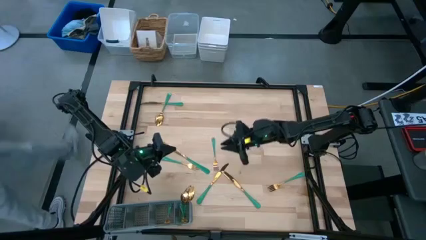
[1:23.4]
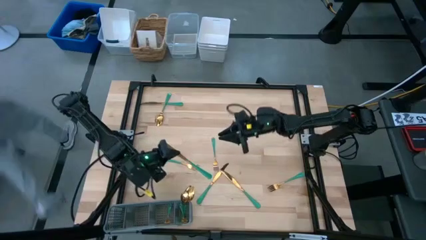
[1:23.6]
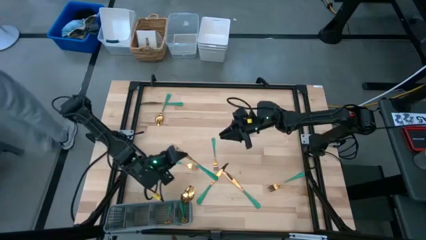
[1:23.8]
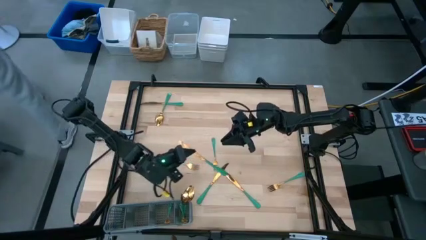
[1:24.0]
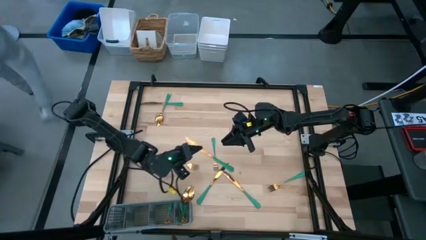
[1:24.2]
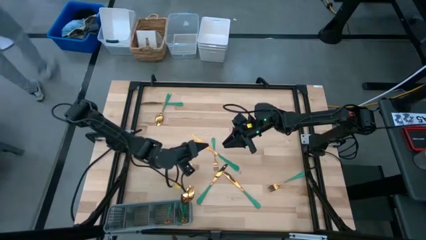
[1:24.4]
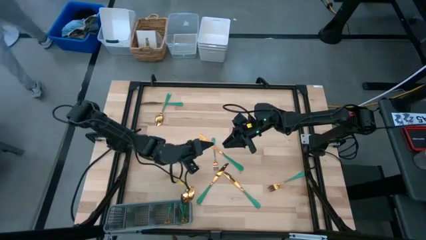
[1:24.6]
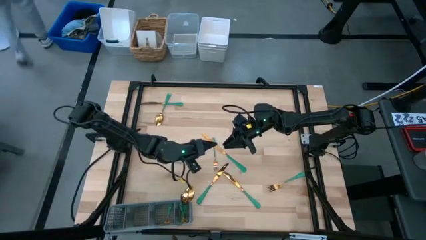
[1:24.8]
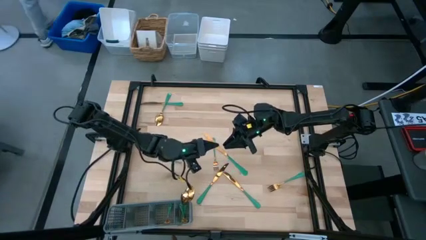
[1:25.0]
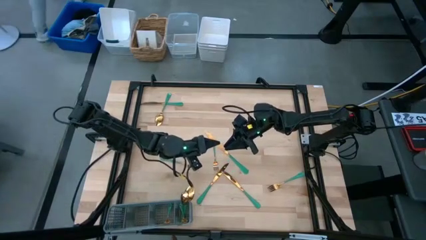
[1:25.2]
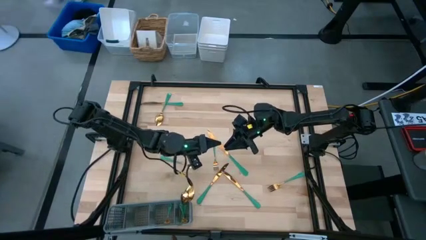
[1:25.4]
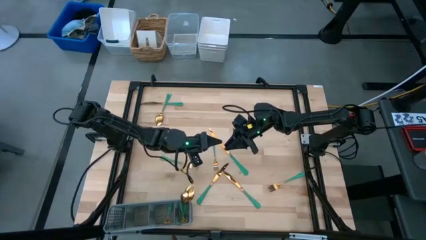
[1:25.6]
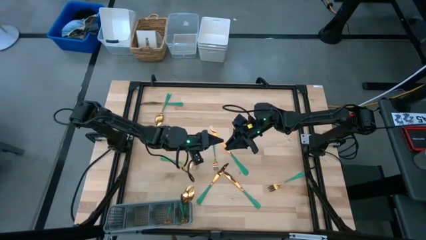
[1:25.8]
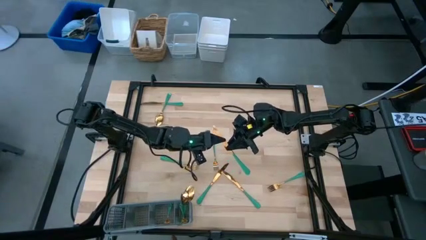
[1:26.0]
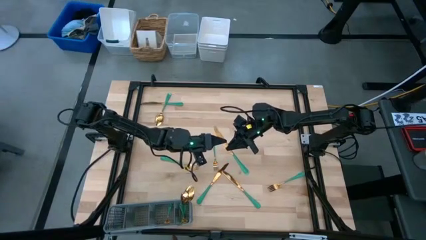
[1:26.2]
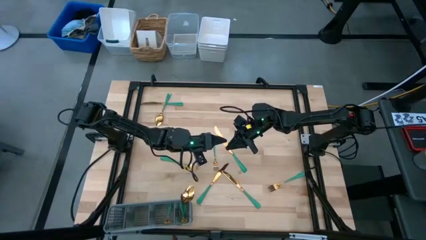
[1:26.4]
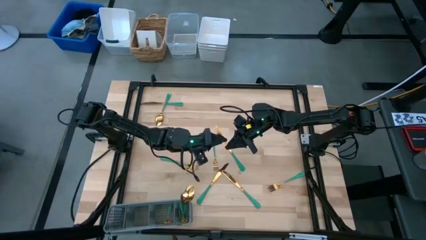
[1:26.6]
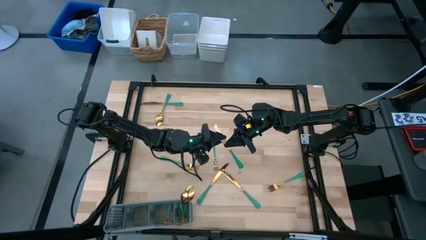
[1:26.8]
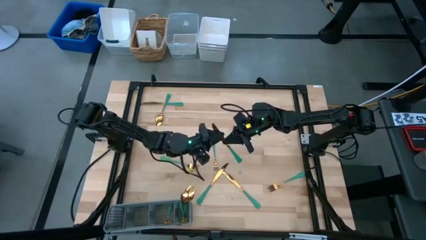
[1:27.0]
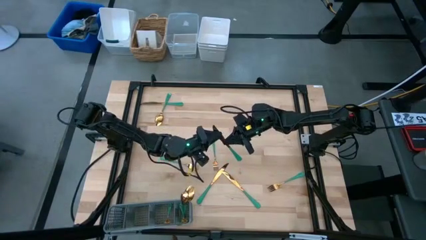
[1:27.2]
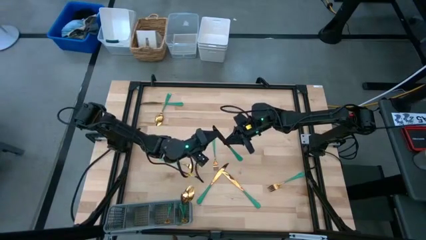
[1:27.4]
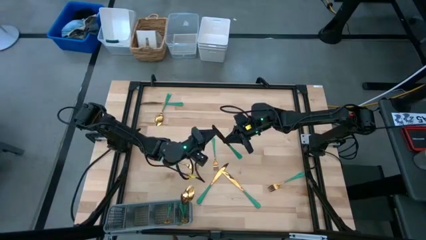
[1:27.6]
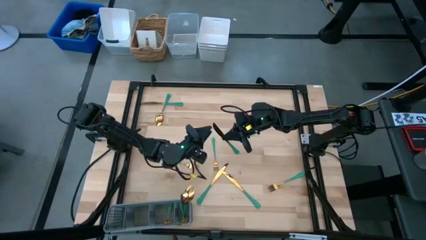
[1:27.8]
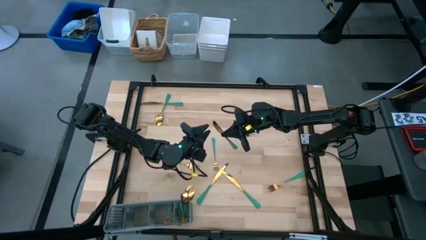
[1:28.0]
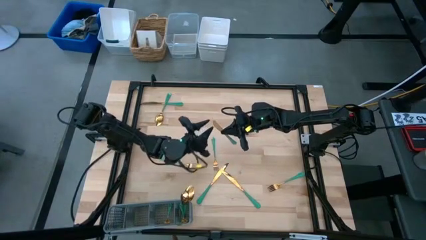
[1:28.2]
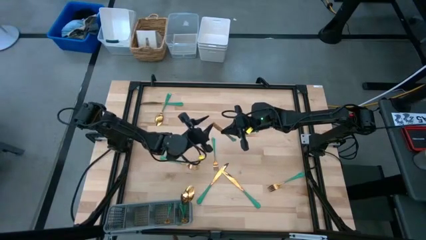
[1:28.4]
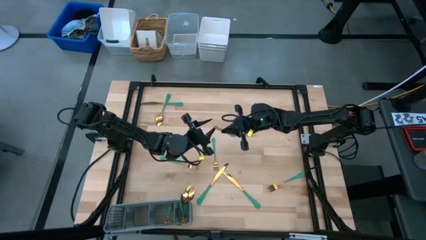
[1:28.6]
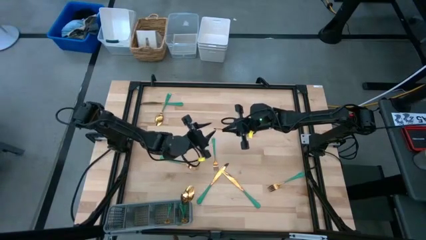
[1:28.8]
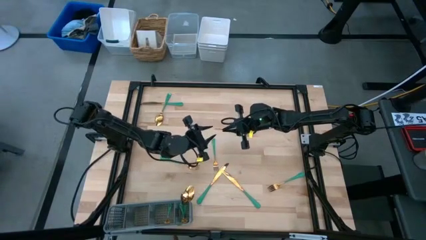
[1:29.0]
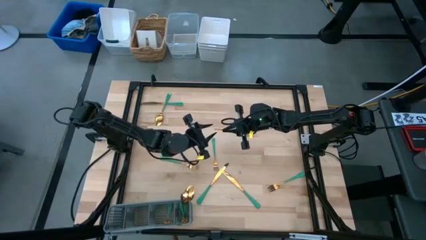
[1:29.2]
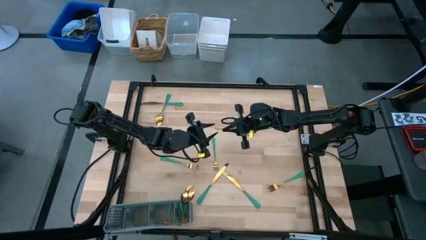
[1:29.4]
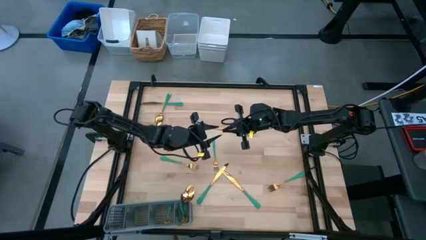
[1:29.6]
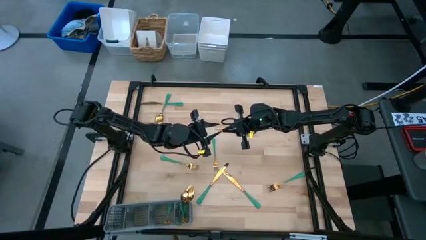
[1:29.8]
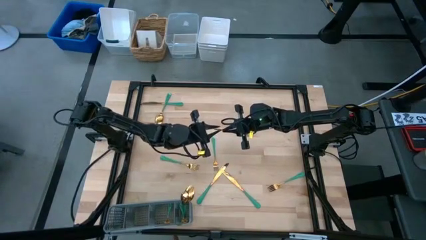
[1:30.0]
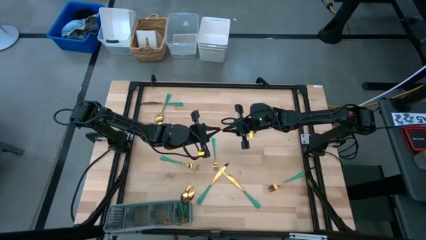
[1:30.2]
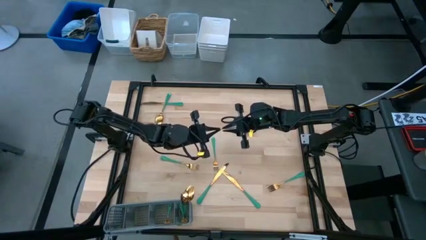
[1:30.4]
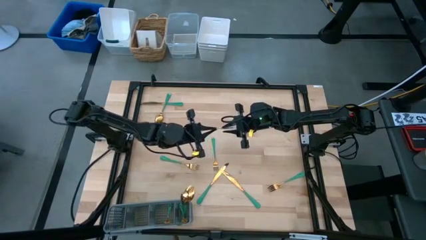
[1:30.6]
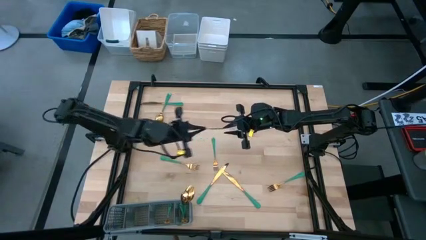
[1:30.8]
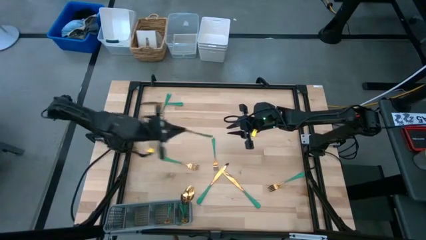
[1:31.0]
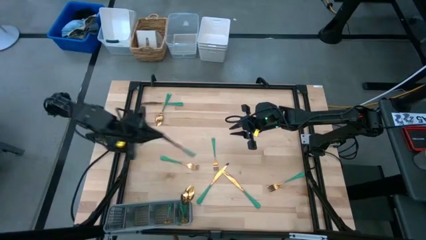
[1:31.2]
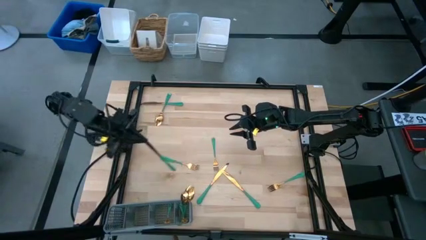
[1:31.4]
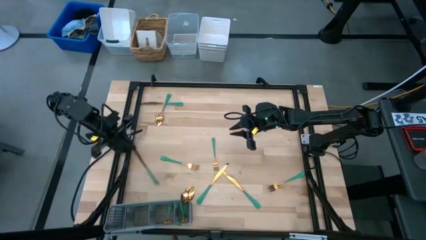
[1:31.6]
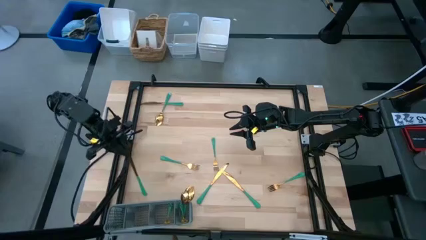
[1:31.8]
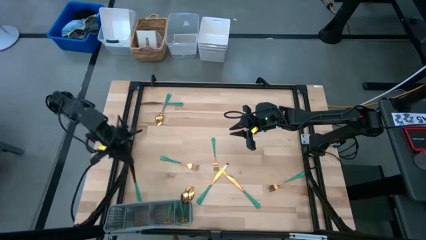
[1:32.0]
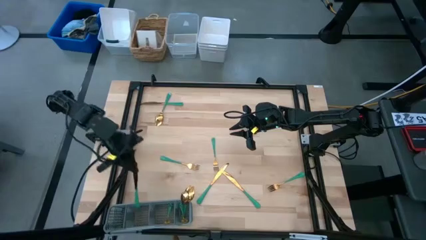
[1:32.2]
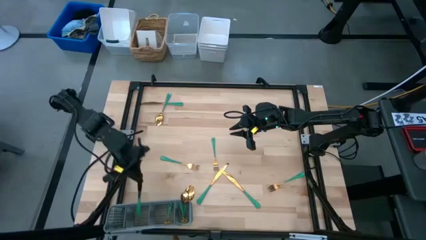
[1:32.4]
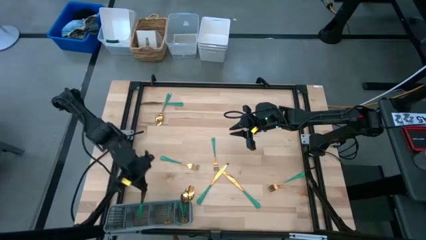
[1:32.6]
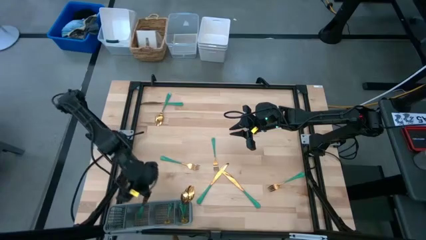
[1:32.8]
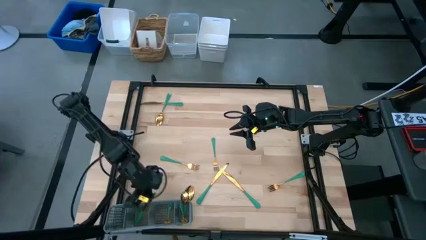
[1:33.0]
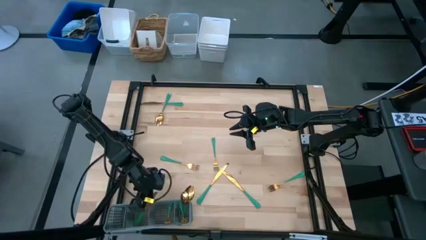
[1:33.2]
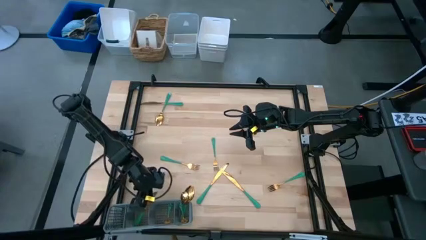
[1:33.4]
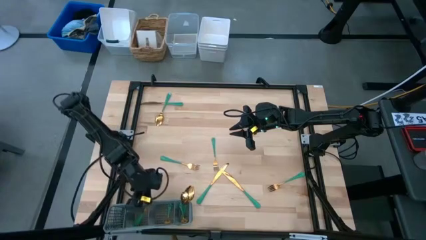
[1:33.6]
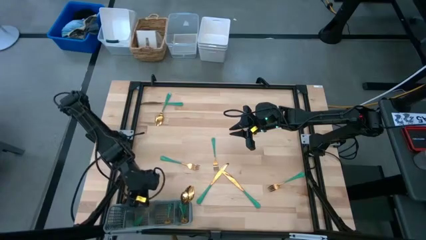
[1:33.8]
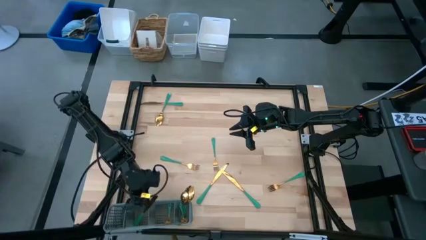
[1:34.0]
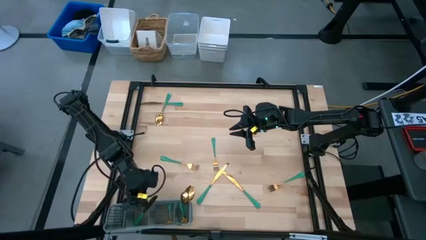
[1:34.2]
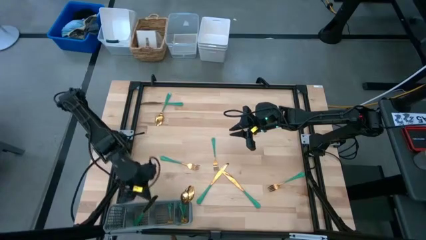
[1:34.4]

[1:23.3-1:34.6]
Task: Sort silverware
Put the right knife into the cutlery rack
